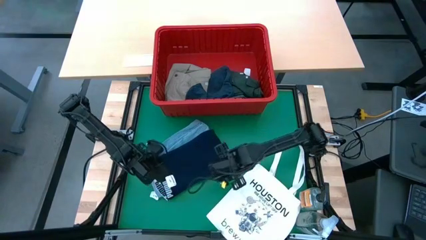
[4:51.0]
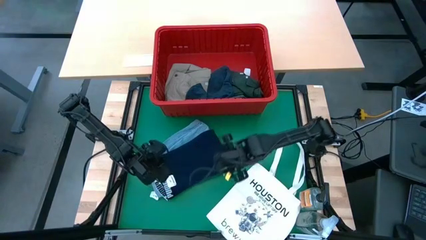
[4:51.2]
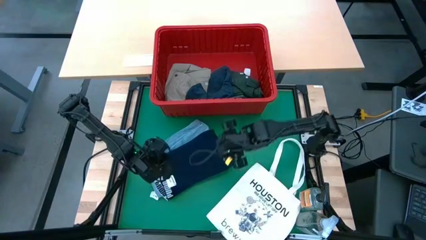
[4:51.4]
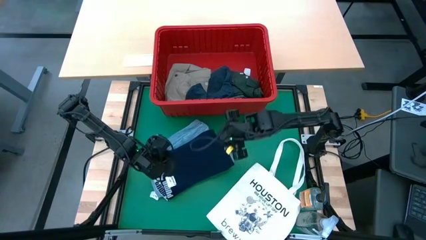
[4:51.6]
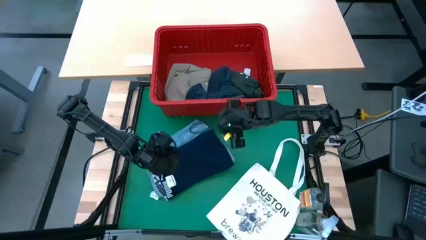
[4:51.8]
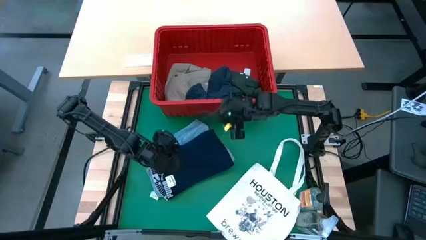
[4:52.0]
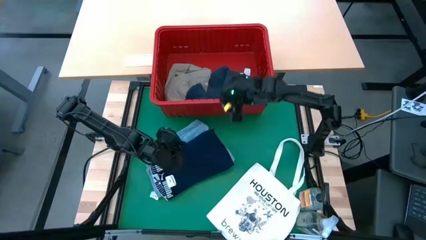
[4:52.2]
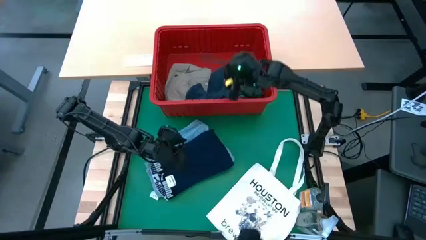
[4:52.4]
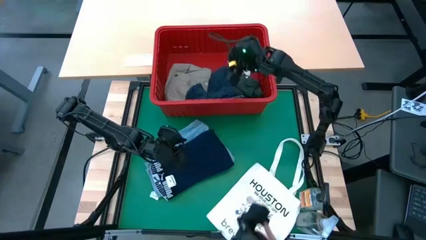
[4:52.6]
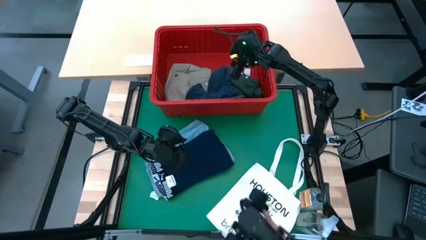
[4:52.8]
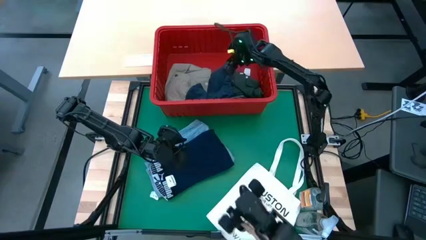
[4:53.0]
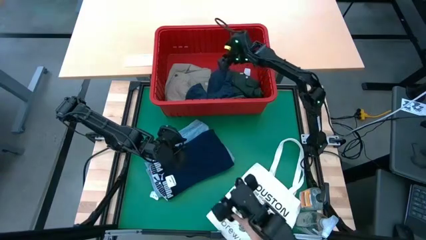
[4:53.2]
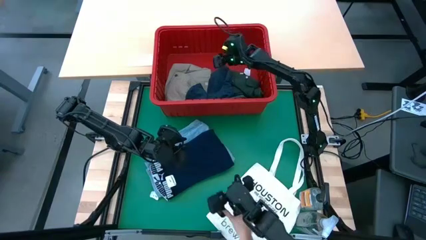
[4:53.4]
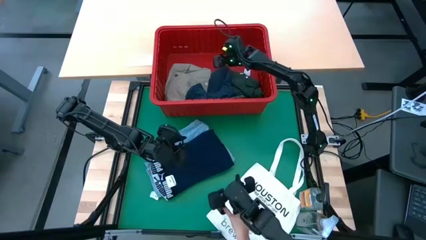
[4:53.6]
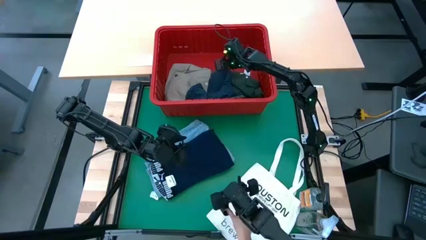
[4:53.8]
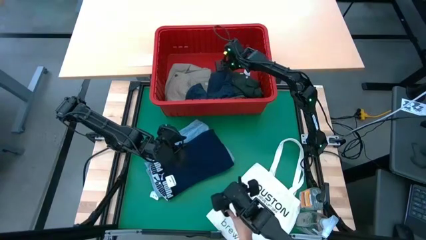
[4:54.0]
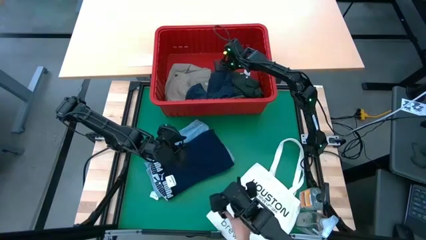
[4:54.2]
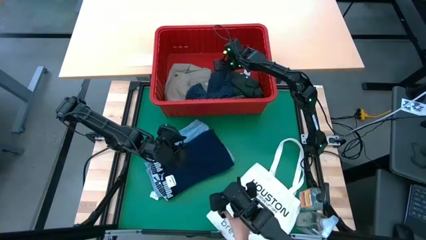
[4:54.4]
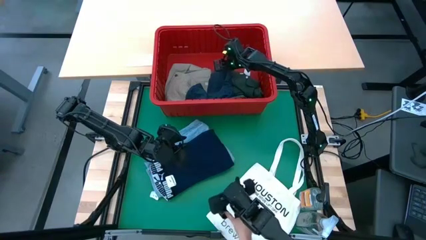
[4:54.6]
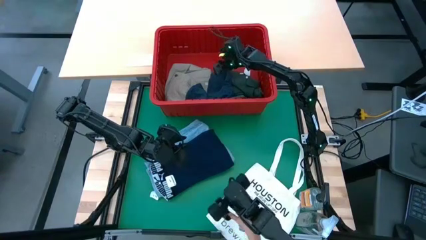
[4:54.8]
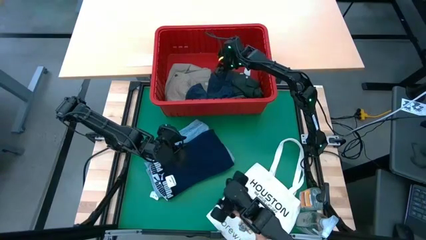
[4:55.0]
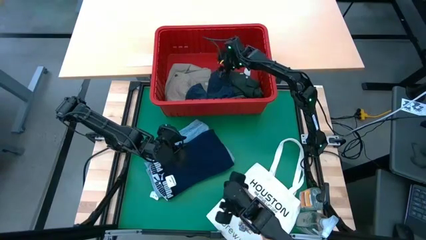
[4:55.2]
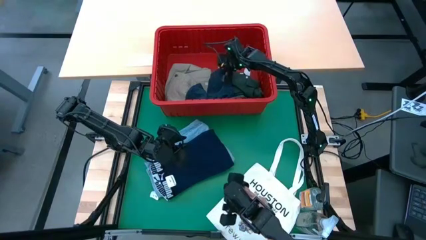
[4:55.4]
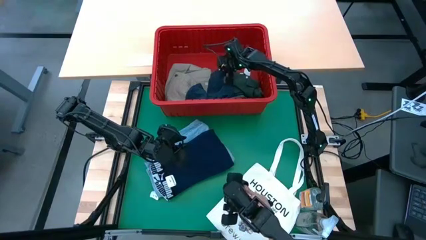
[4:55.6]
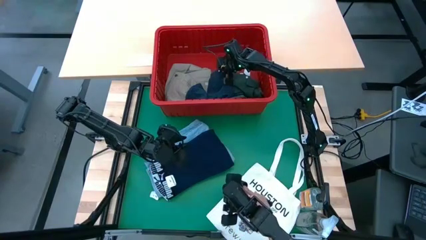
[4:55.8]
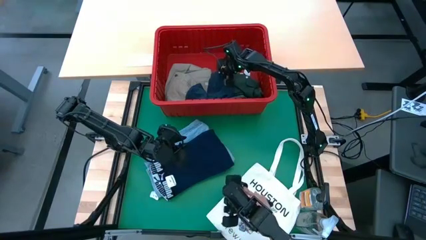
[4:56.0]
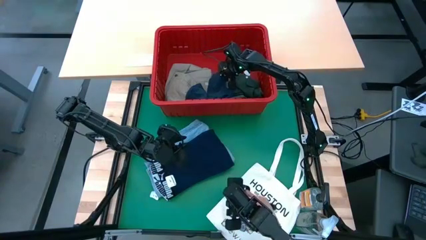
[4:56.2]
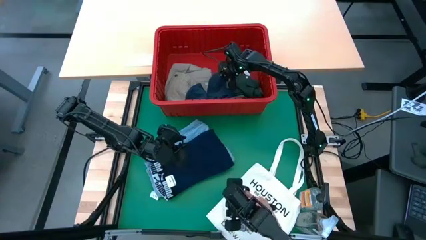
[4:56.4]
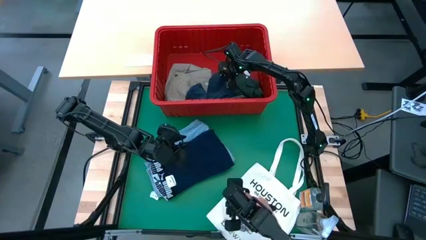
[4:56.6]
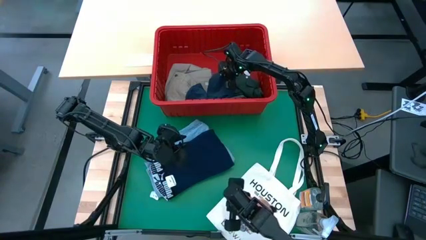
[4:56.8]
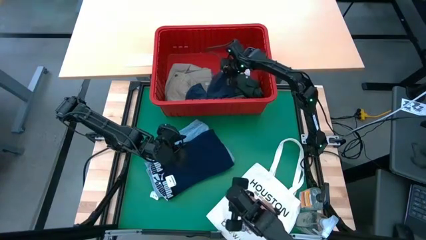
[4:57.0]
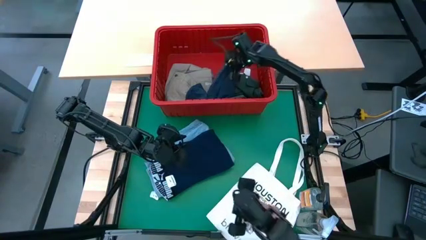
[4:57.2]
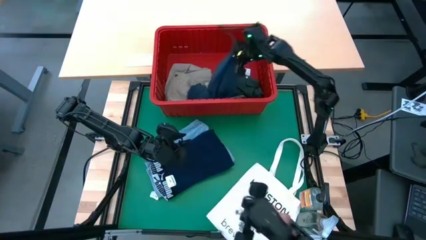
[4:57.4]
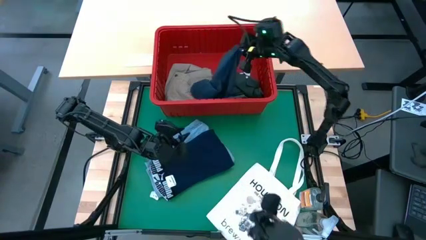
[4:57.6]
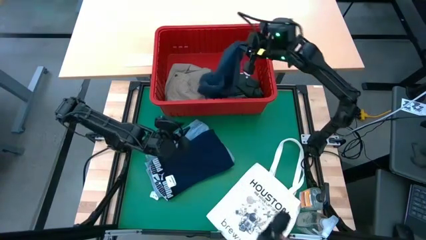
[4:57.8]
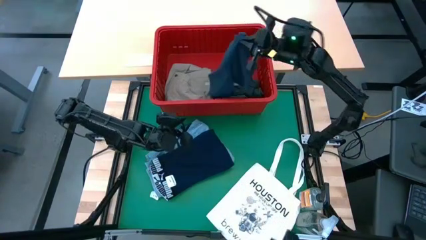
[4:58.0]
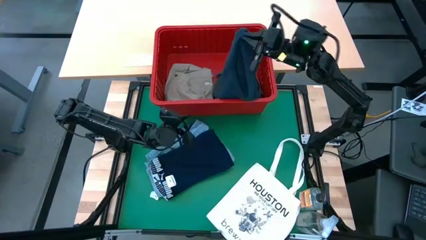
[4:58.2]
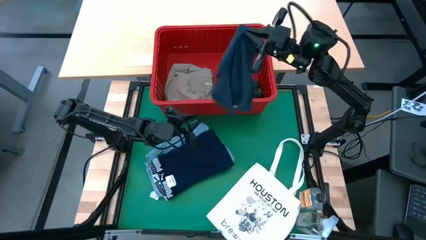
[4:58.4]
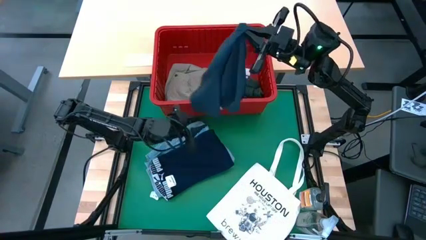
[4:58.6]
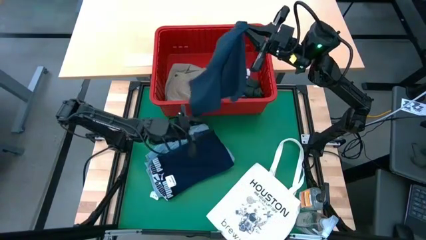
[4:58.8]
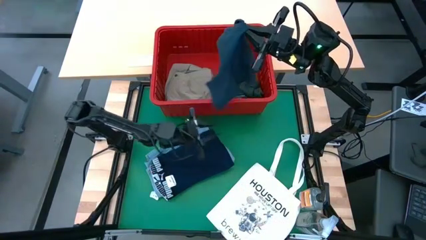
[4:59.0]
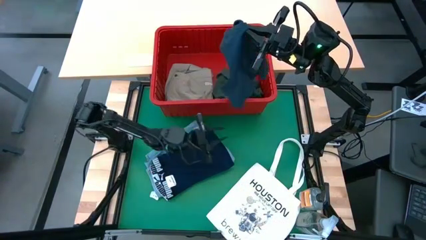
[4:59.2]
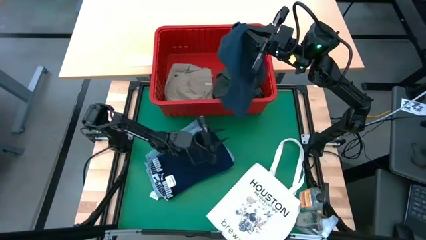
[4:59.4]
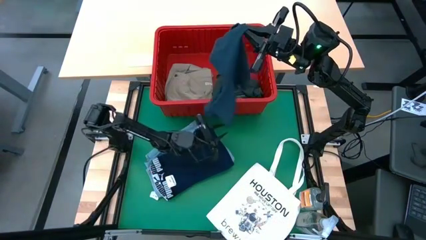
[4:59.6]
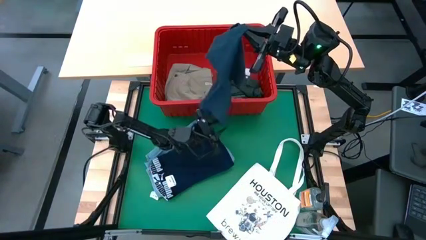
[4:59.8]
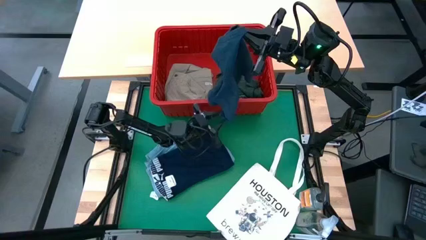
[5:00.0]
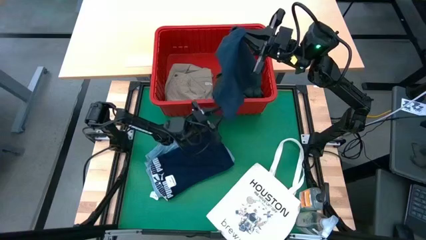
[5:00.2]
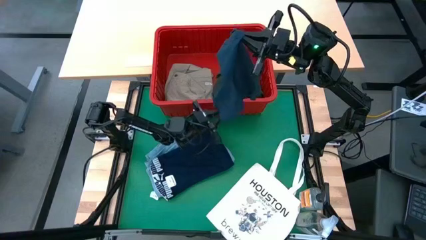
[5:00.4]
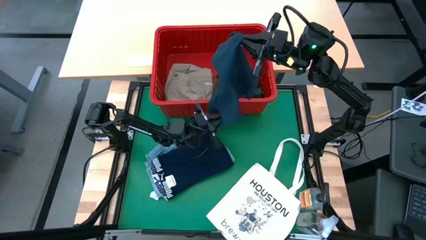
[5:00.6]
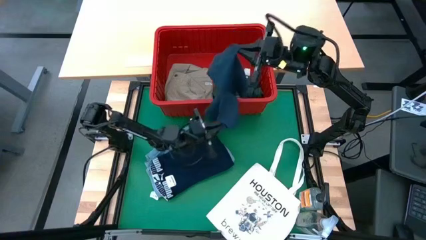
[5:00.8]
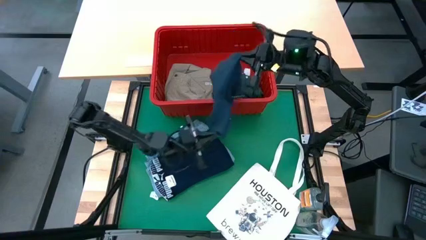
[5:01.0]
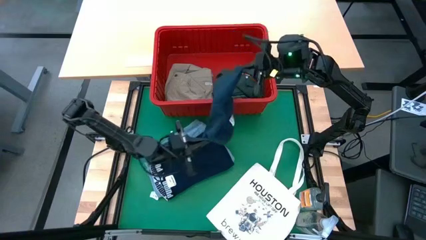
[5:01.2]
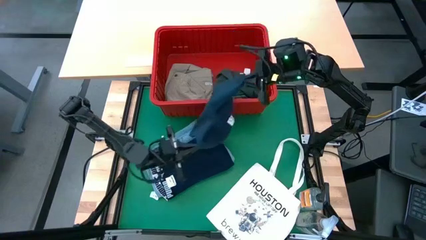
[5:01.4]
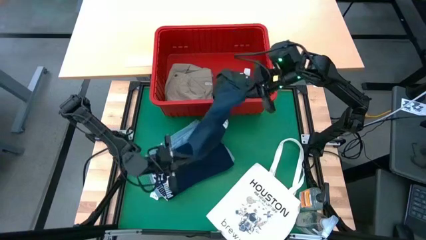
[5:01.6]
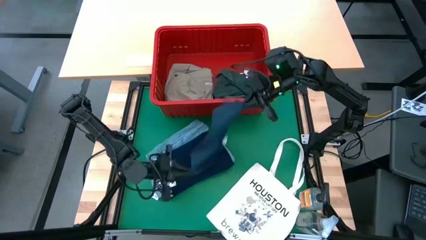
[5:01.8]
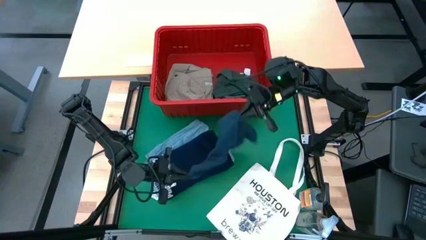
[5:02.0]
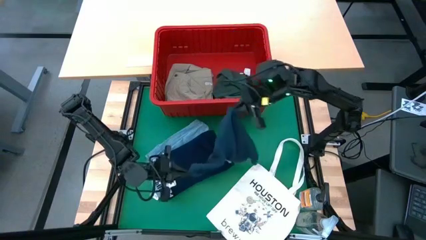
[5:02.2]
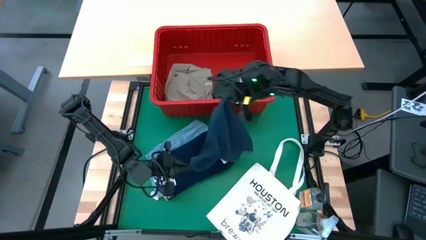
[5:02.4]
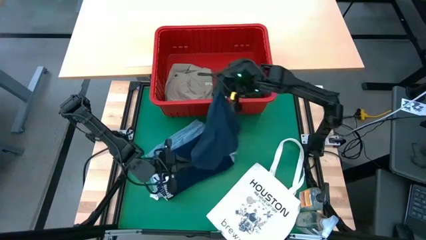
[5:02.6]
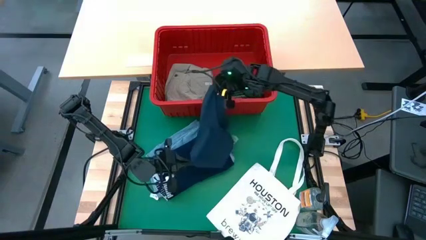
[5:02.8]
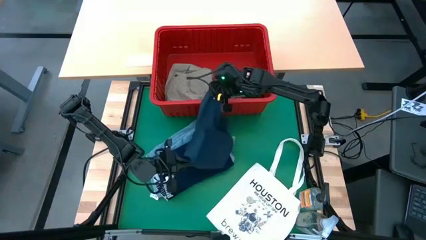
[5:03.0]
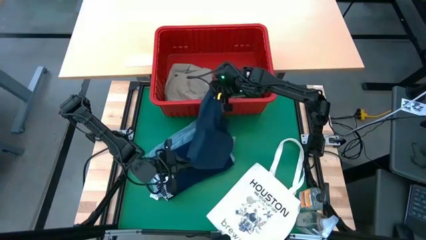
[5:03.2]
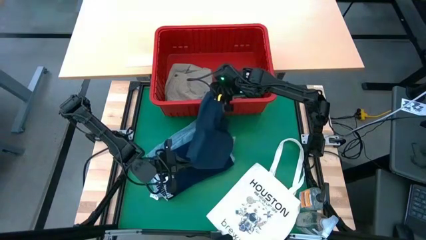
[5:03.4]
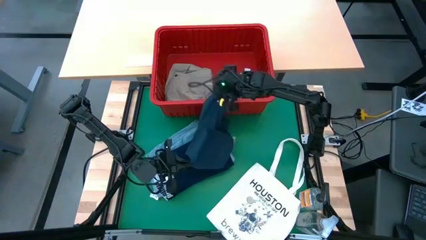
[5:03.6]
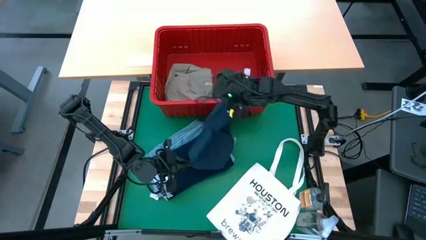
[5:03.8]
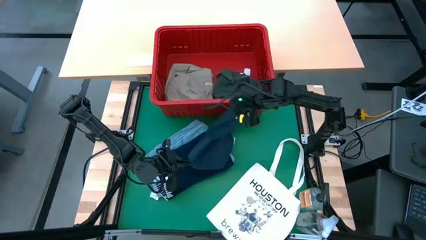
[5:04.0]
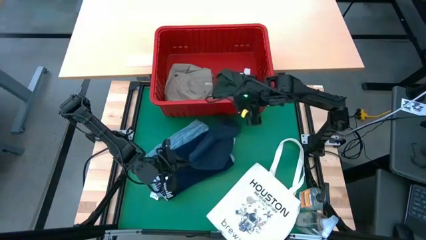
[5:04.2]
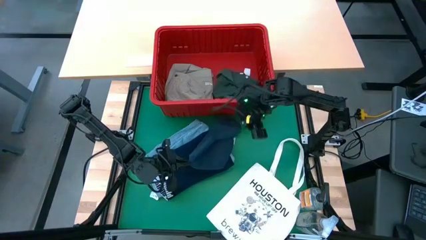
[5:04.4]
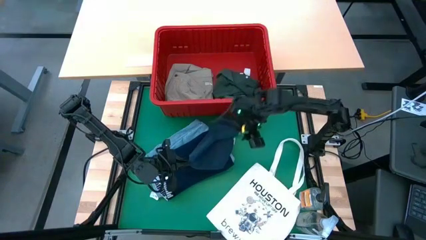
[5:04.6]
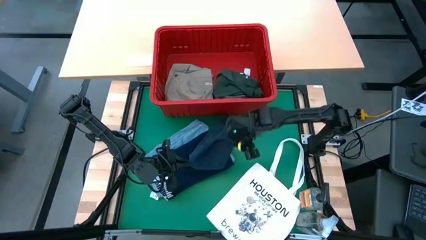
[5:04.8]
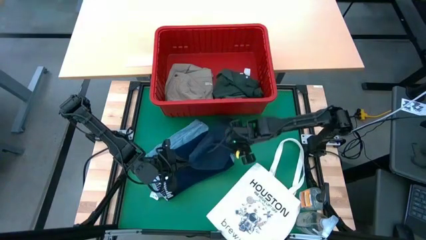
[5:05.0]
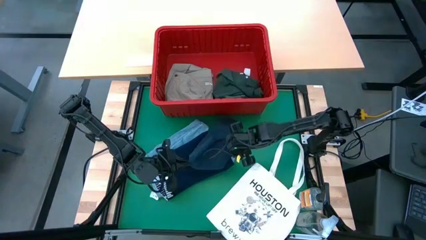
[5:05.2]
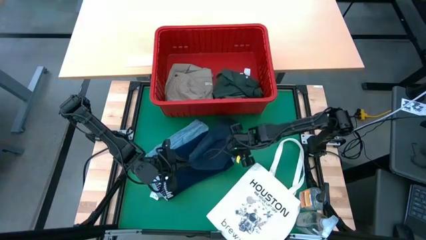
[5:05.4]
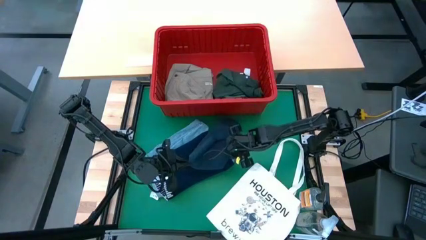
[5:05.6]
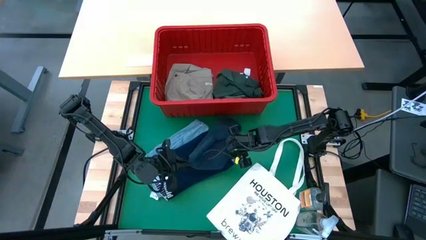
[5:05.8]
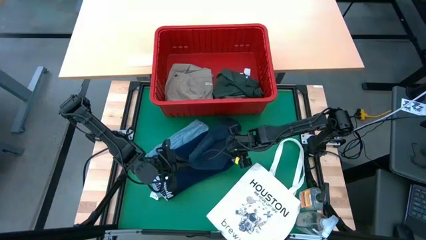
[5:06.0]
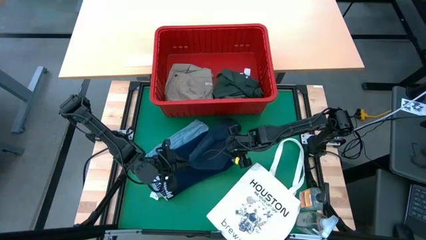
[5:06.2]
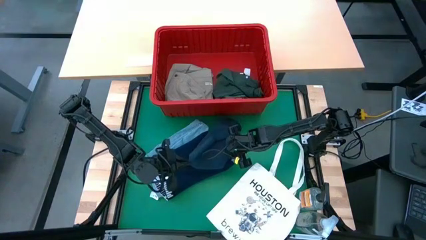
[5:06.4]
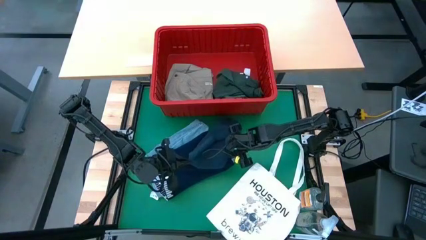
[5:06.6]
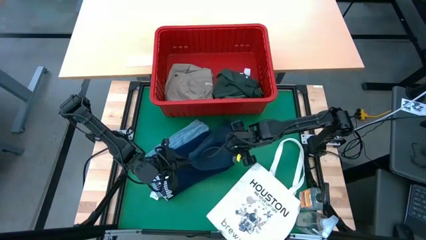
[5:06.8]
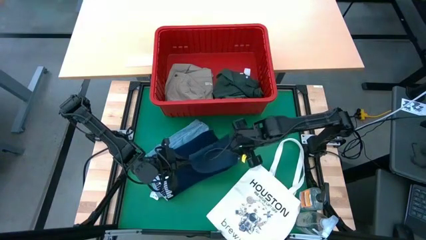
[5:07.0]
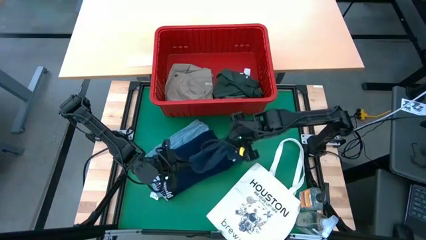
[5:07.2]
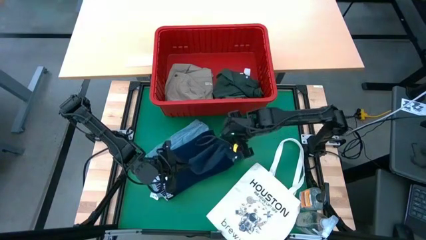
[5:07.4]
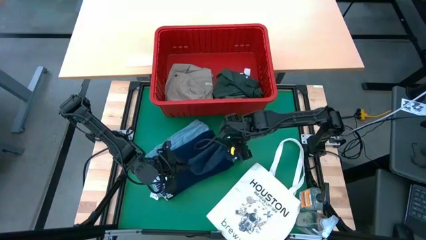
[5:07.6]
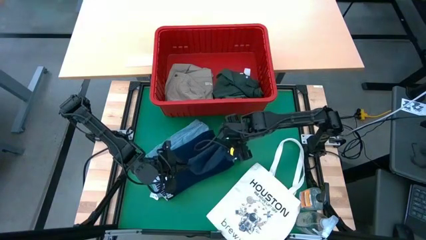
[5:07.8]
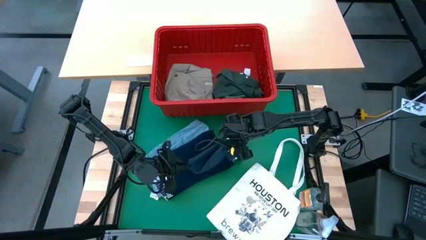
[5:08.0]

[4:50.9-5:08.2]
Task: Fold Laundry from Bin
Stack the gray shorts on top of the dark blue boxer shorts
